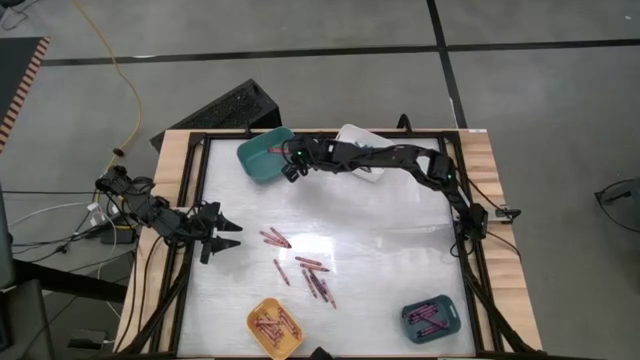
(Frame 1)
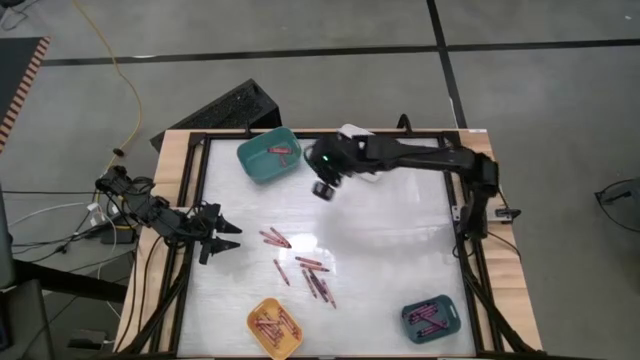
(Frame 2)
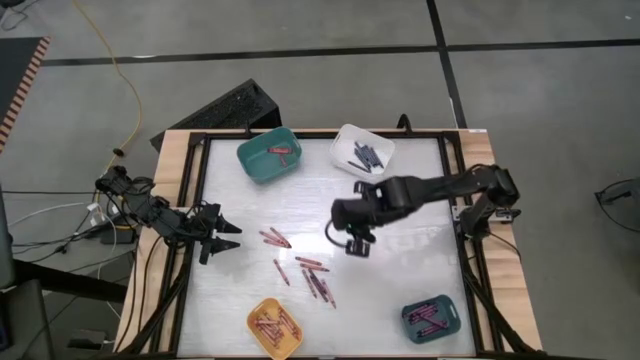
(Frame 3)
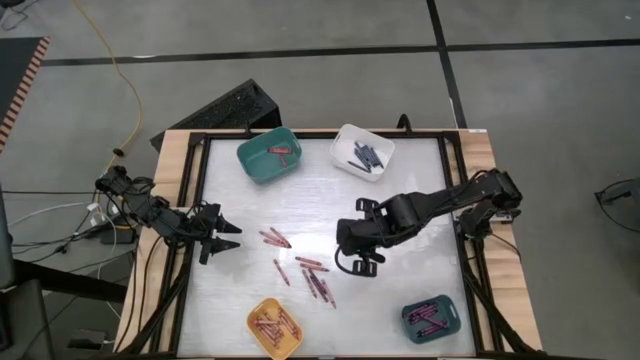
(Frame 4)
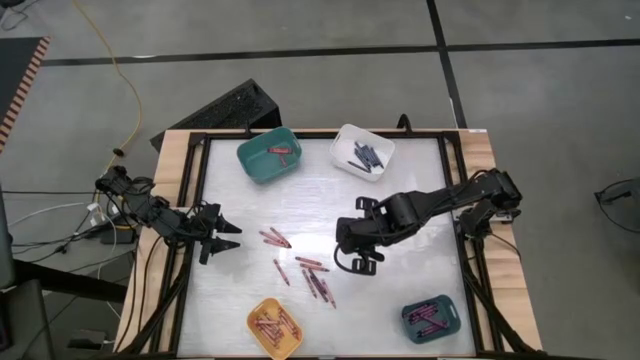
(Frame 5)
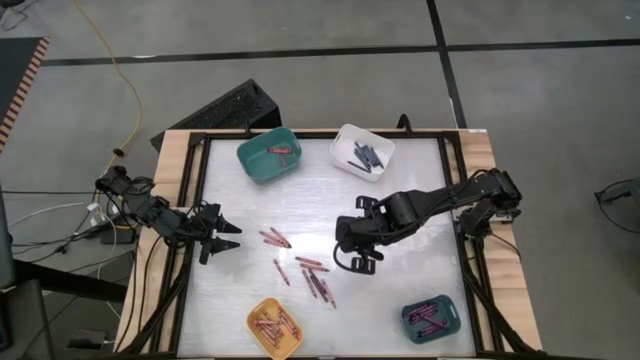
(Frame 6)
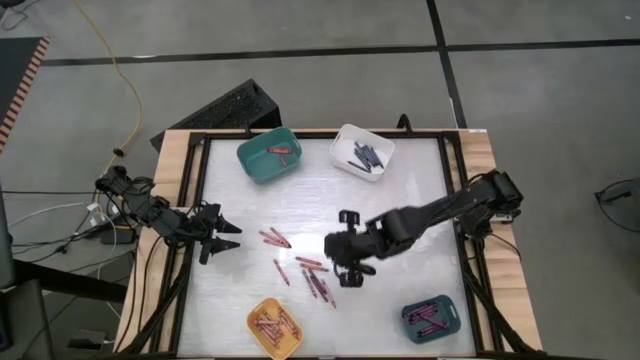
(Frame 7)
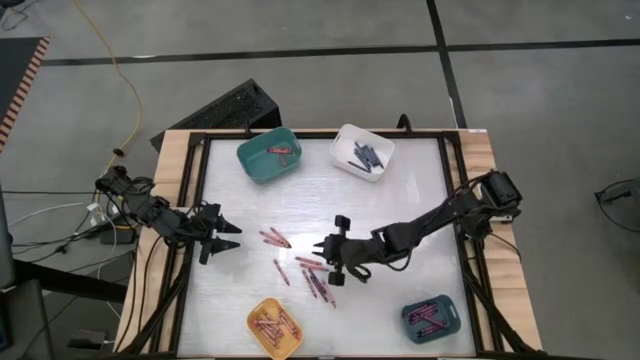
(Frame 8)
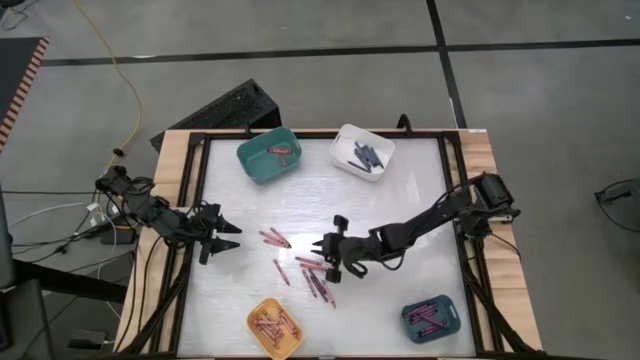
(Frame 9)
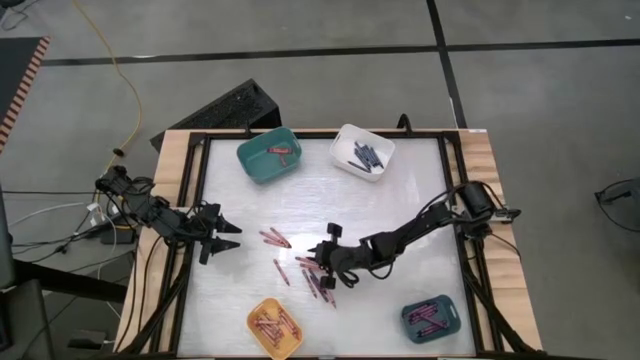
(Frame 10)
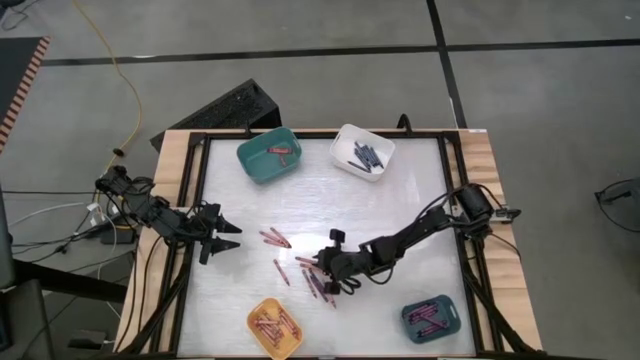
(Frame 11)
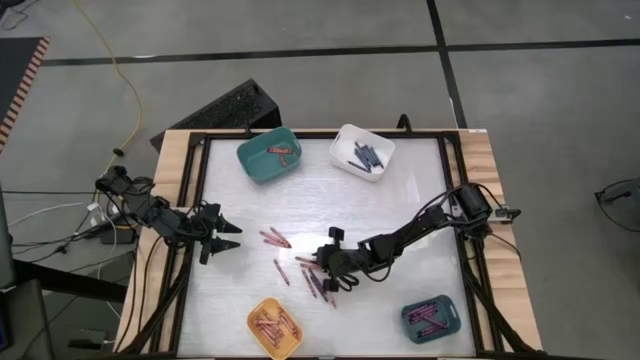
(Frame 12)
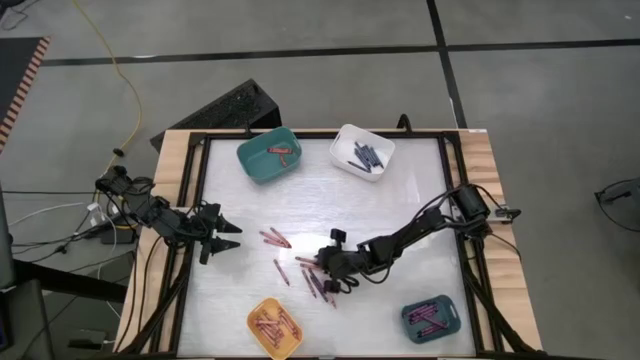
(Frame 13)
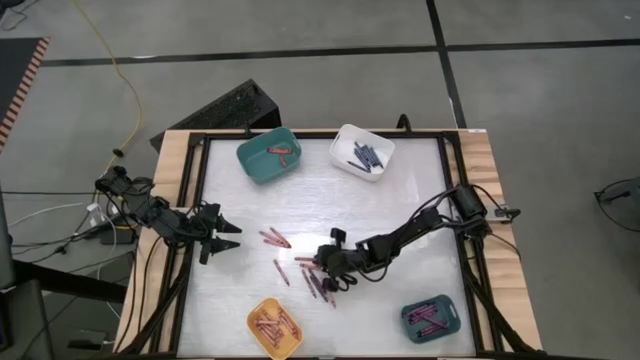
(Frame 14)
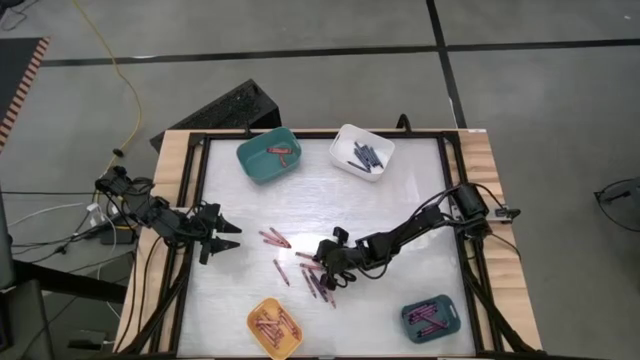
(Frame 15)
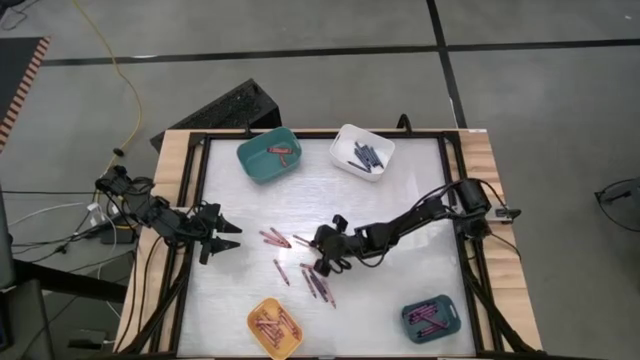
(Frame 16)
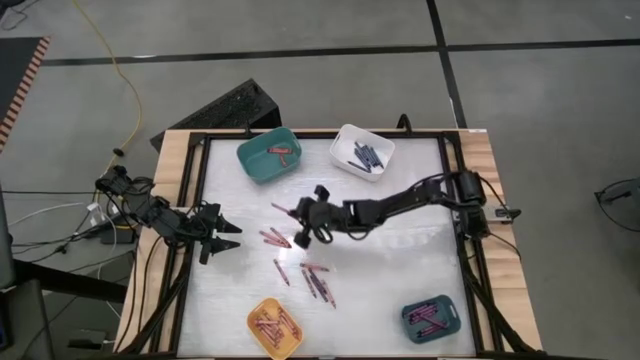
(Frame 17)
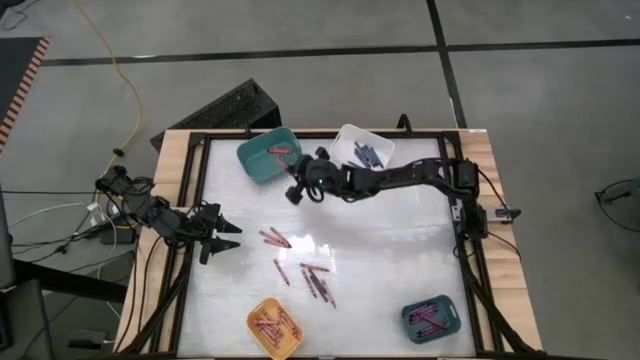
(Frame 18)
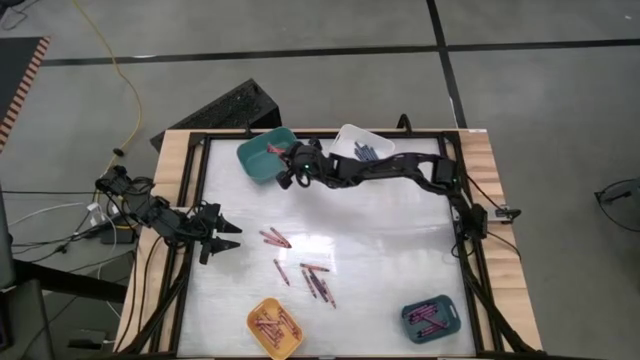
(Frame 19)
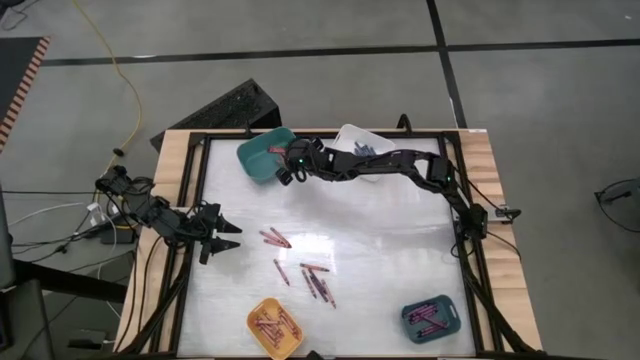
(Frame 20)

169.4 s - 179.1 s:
Task: Sort crayons
Put the red crayon into the top green bin

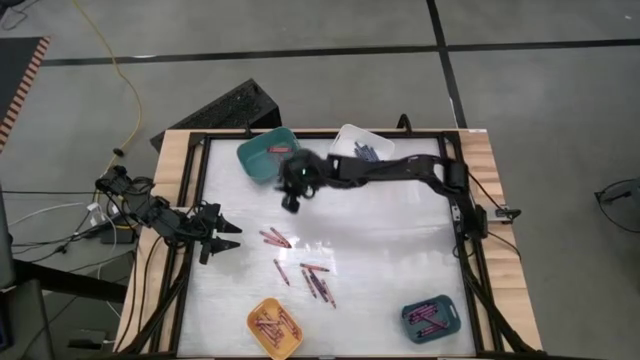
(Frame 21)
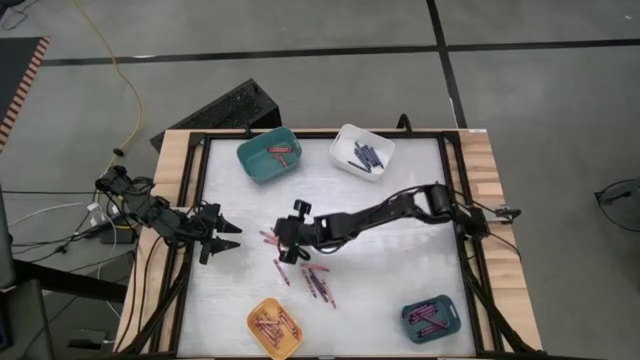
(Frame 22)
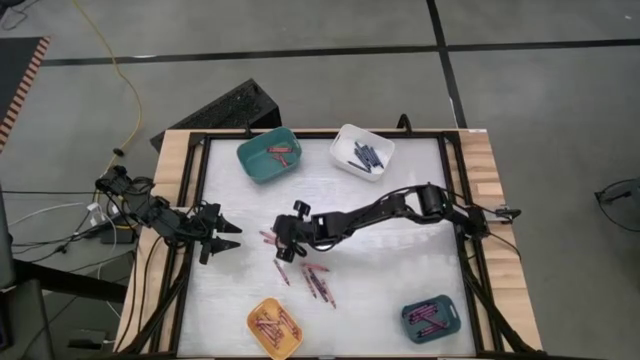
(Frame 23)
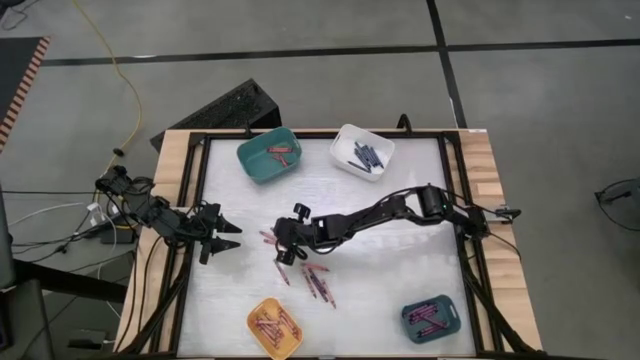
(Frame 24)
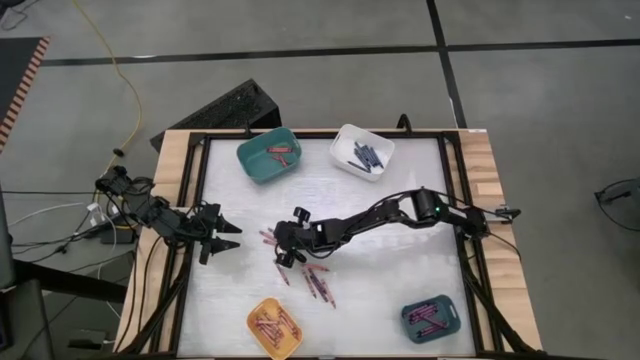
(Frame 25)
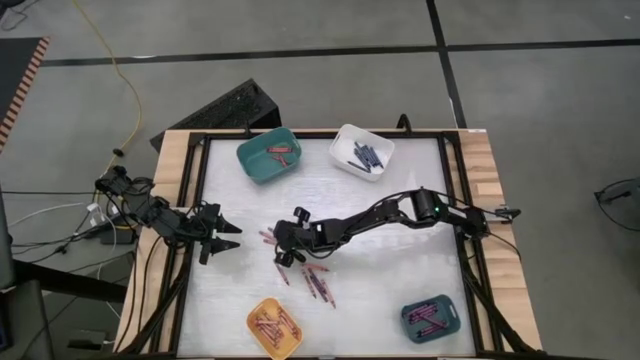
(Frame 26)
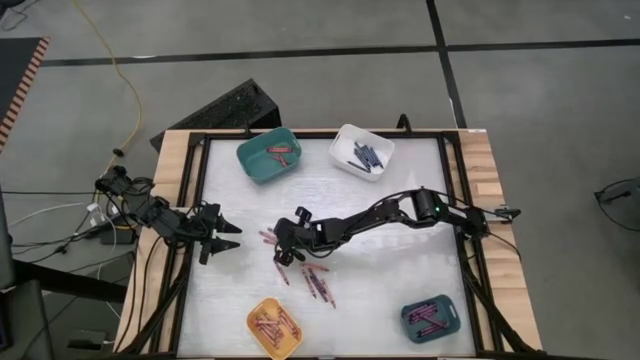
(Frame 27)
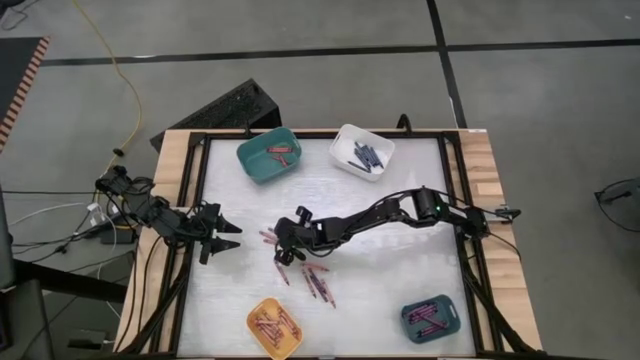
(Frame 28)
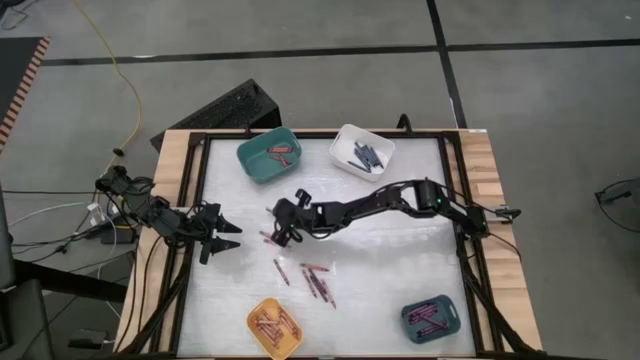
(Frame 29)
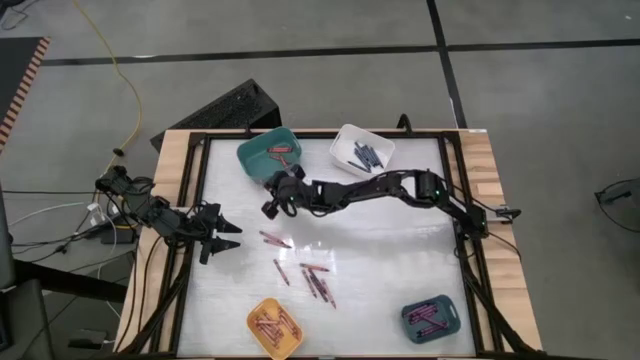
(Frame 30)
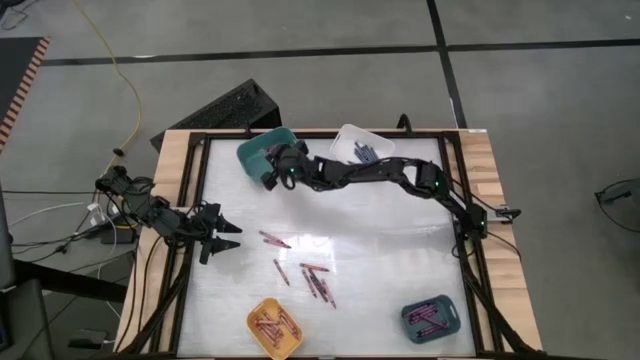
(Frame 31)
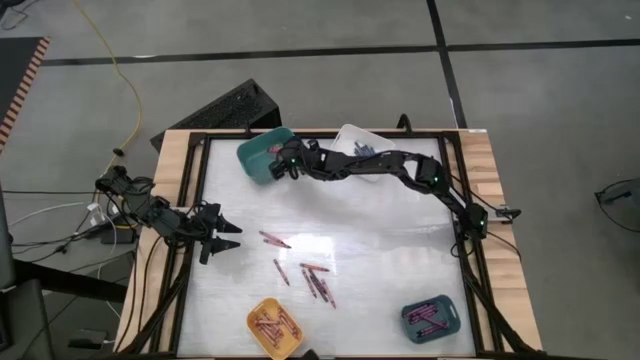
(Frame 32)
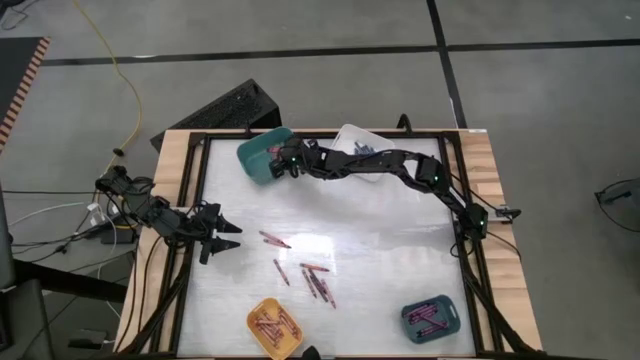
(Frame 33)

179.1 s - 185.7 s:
Put the red crayon into the top green bin

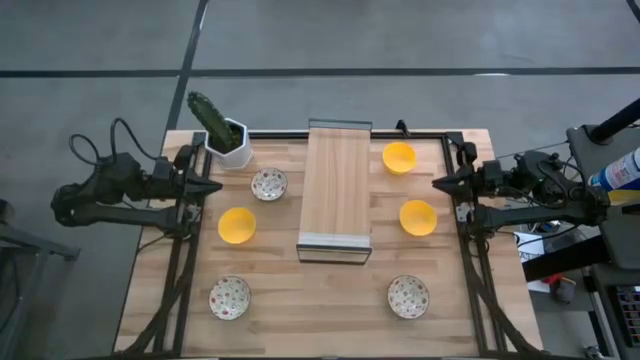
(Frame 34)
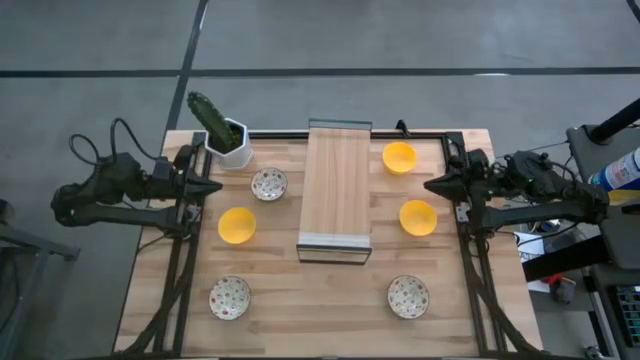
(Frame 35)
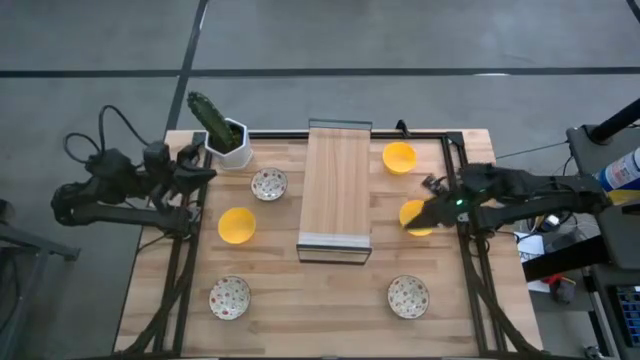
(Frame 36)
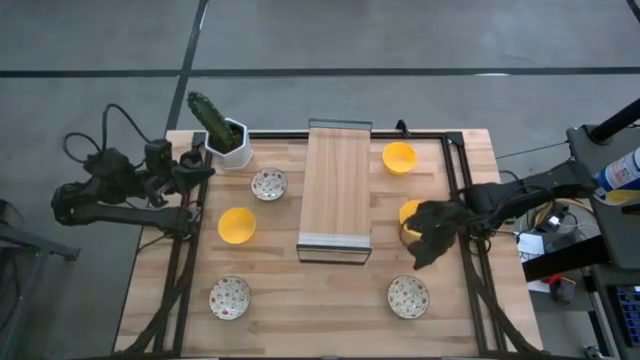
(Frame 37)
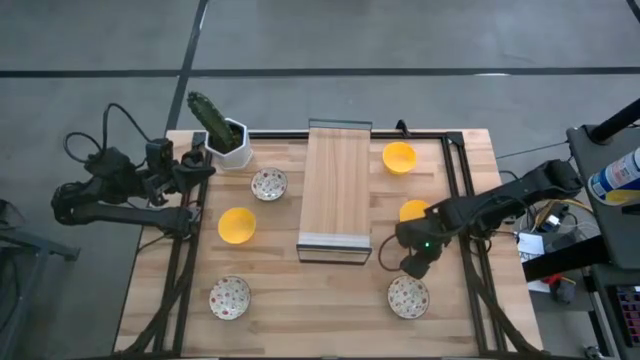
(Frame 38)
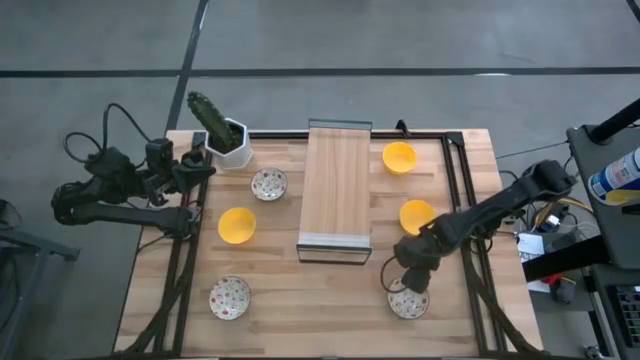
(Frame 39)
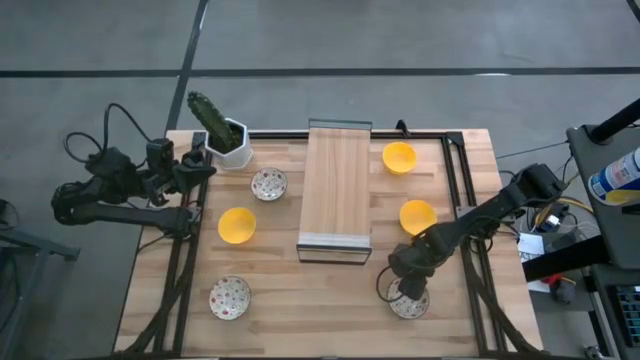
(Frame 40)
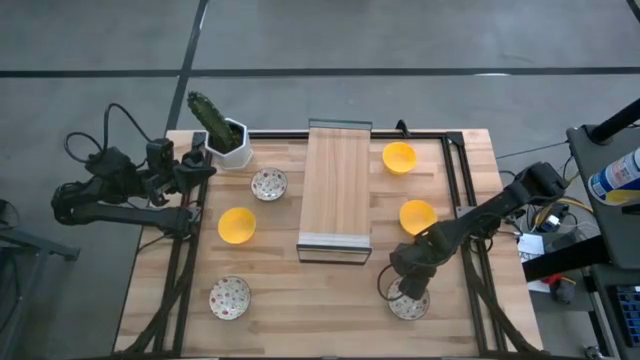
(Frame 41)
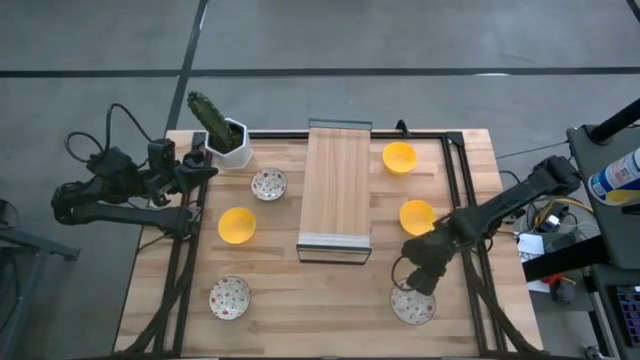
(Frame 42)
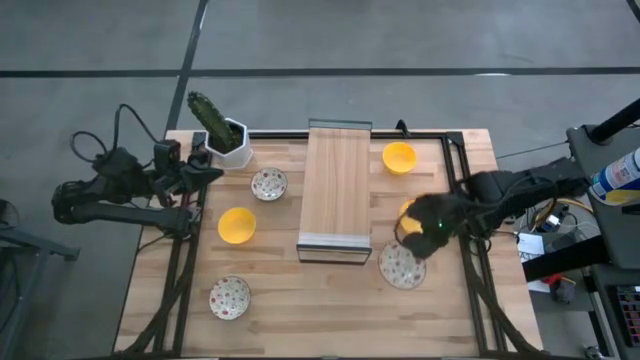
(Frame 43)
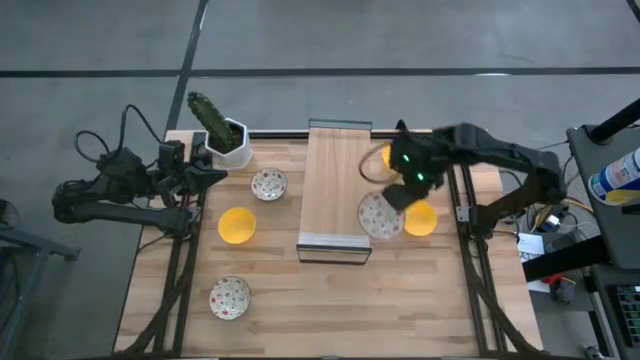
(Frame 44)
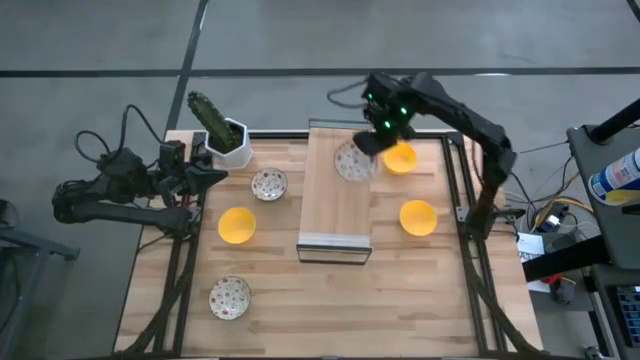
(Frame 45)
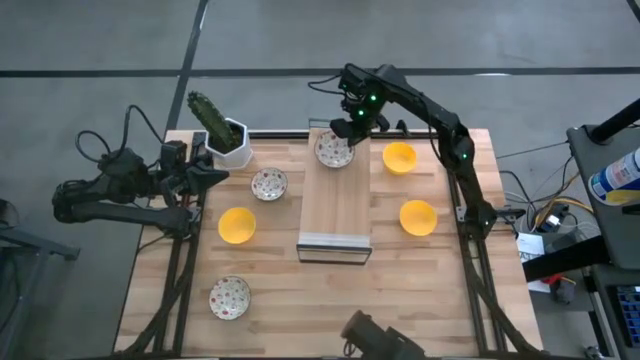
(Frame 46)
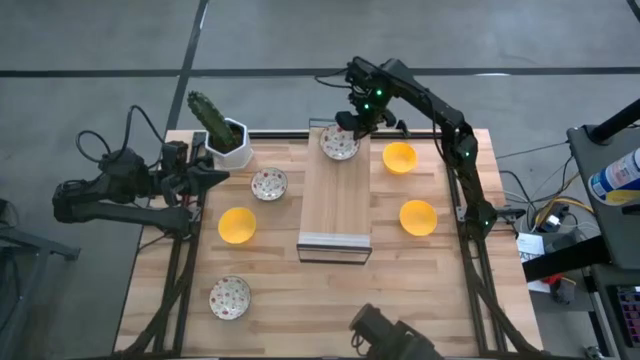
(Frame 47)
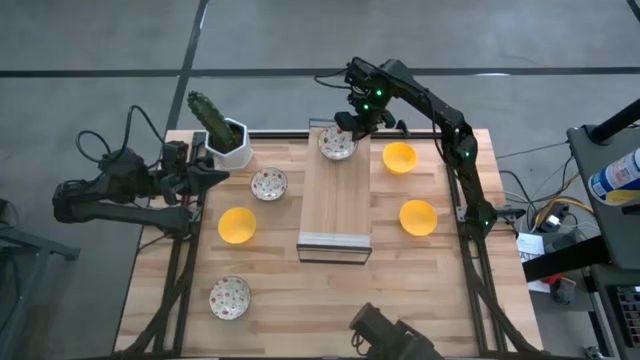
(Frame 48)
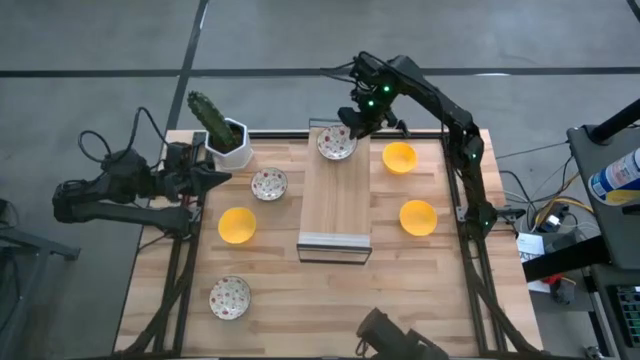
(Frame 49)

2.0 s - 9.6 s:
Task: Pick & Place Mini bowls
Put the bottom right white bowl on the shelf
